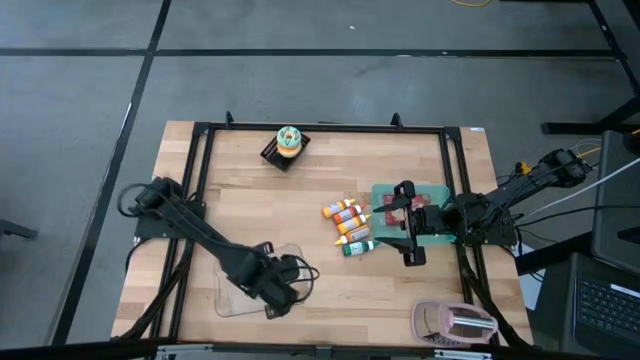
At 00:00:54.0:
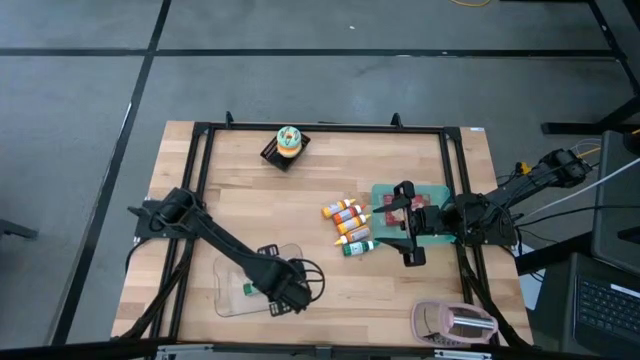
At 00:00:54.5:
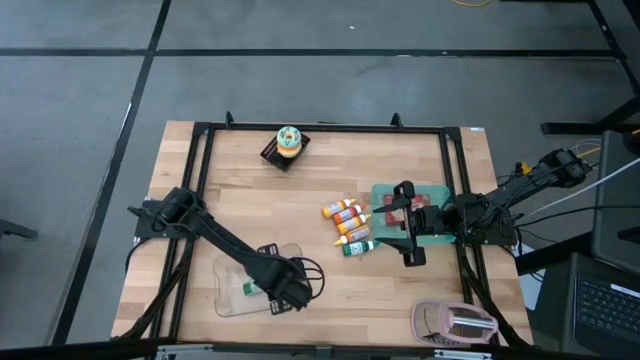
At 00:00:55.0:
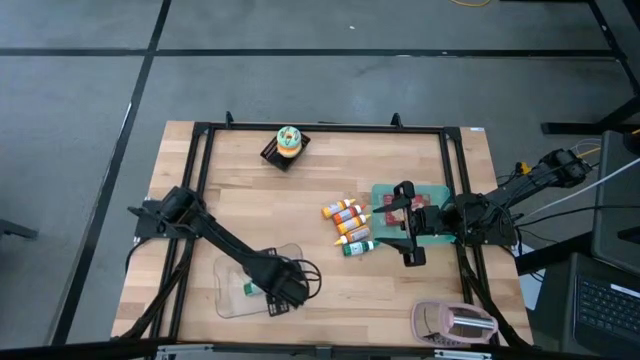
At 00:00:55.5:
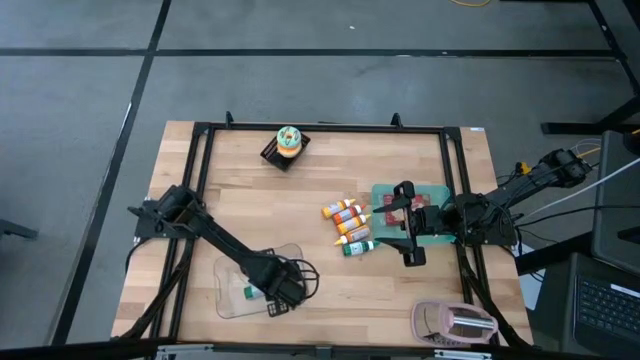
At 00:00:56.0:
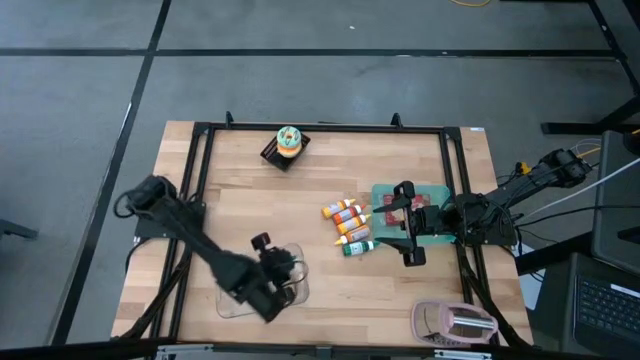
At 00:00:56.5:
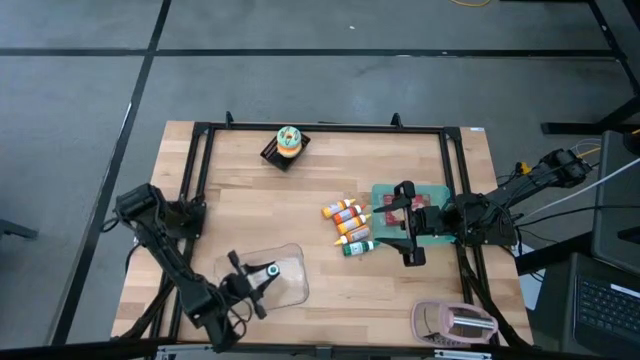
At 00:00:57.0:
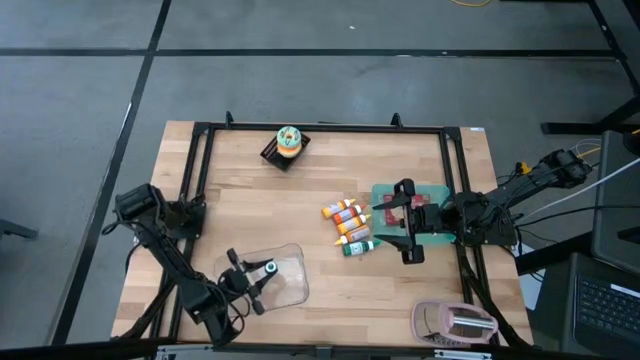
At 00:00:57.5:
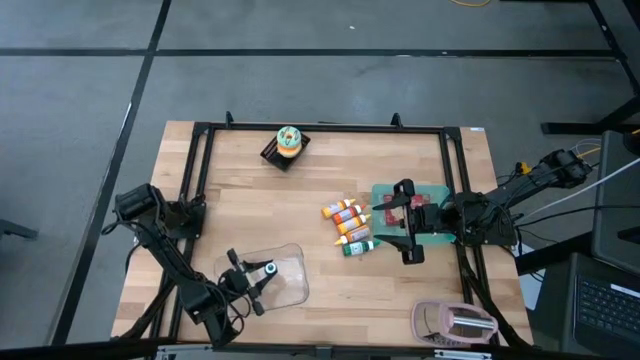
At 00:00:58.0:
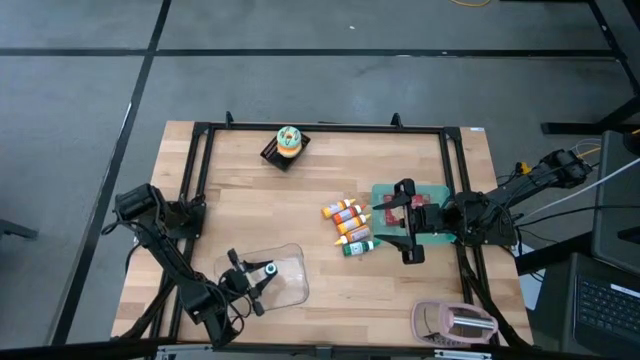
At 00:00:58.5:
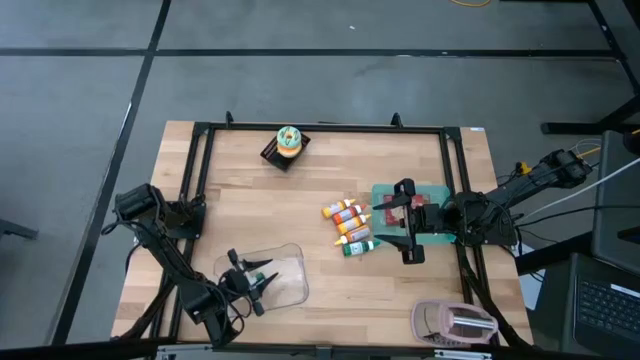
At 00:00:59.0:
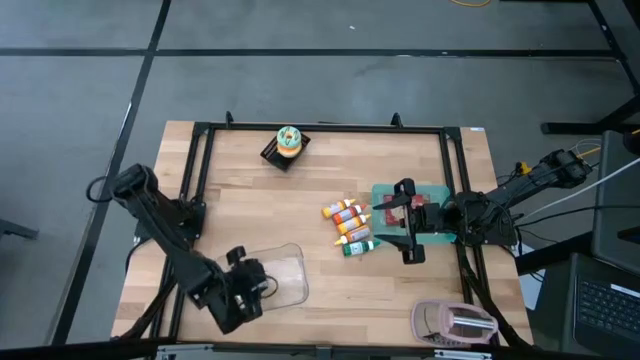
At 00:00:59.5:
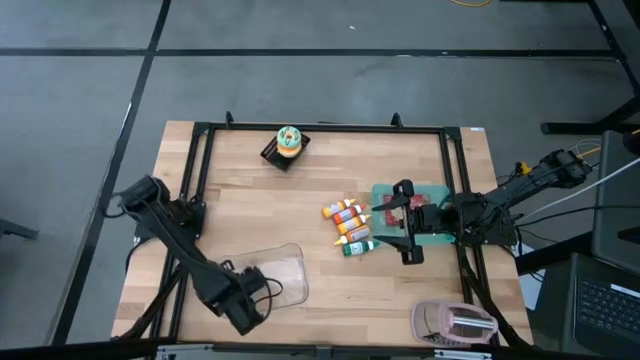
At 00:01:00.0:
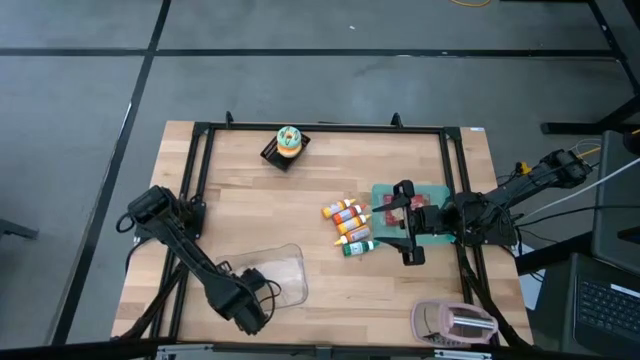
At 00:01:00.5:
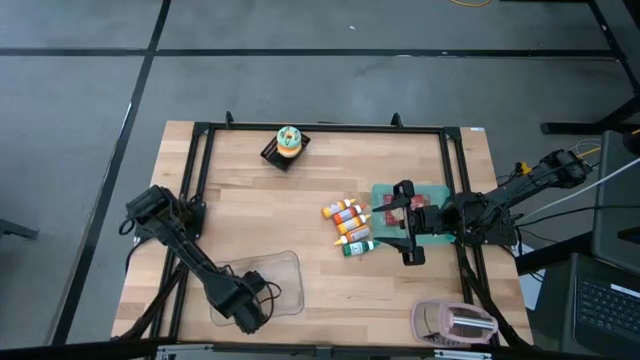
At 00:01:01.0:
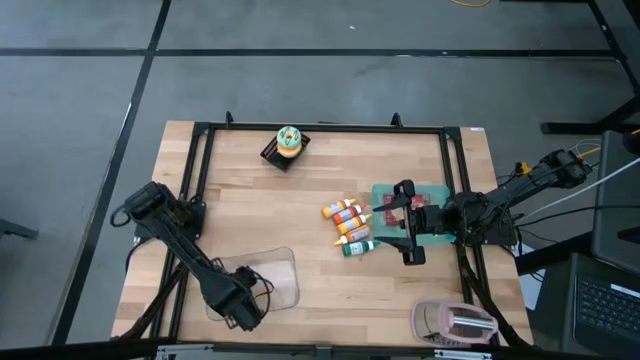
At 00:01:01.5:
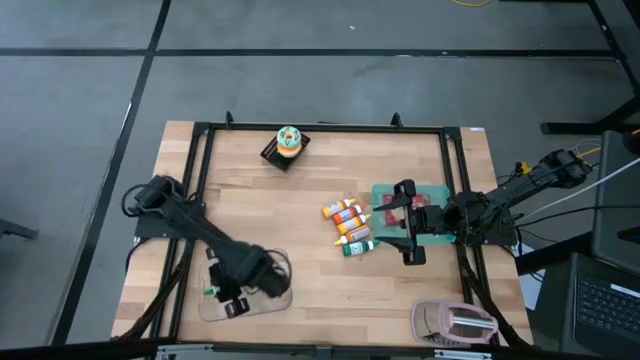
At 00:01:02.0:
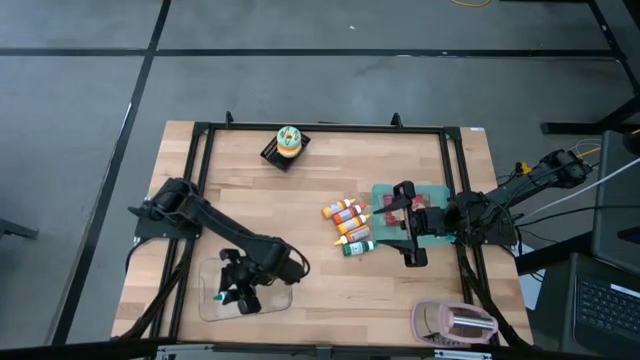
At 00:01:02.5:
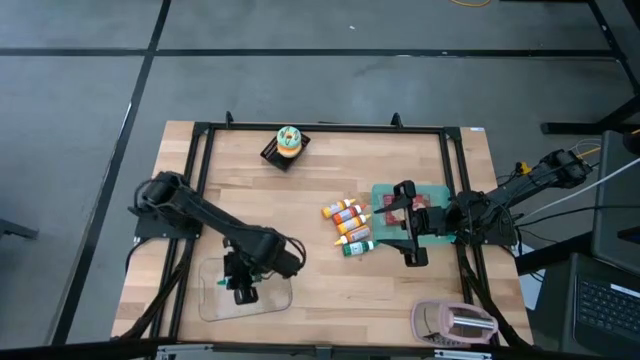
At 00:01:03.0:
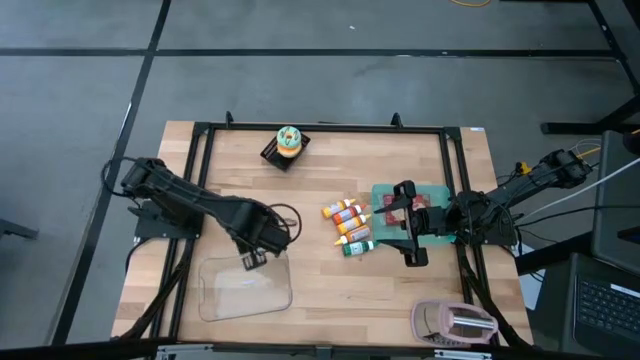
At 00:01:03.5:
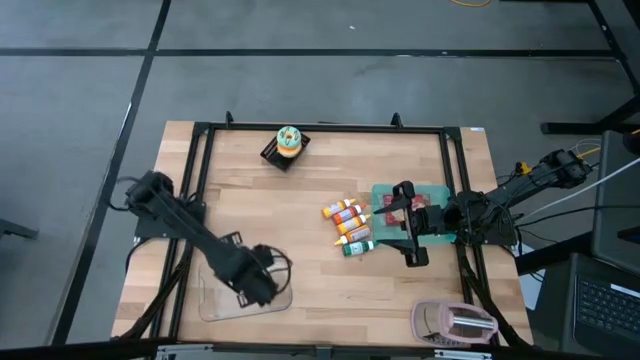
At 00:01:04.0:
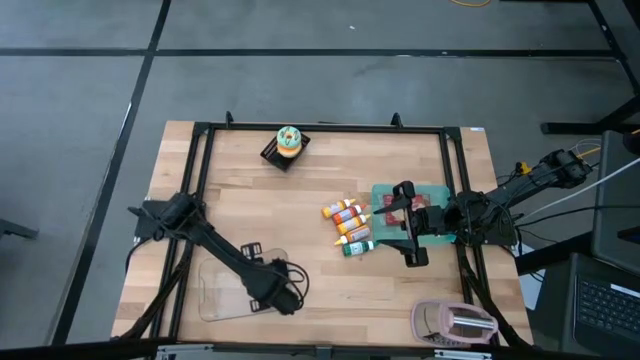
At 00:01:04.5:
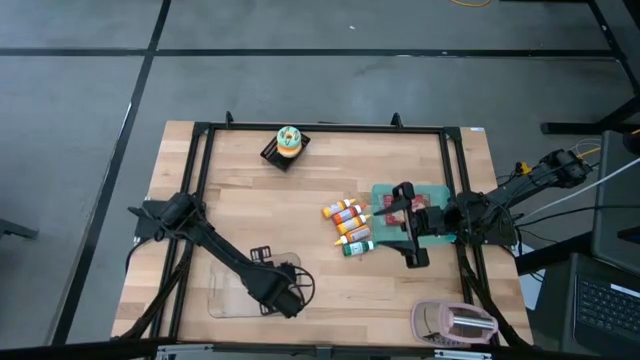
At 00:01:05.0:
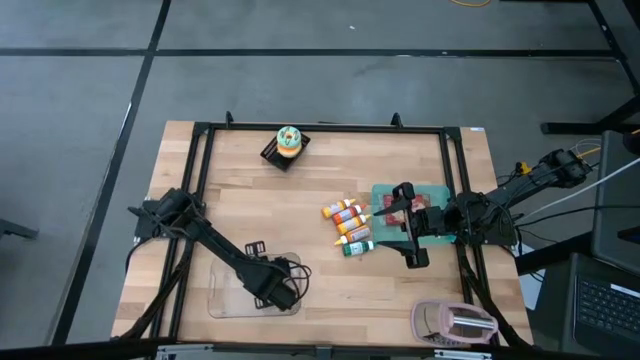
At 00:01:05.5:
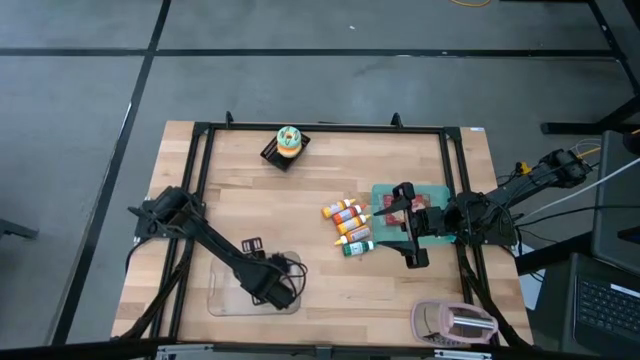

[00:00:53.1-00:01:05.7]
Adjust the green food coloring bottle in the transparent bin

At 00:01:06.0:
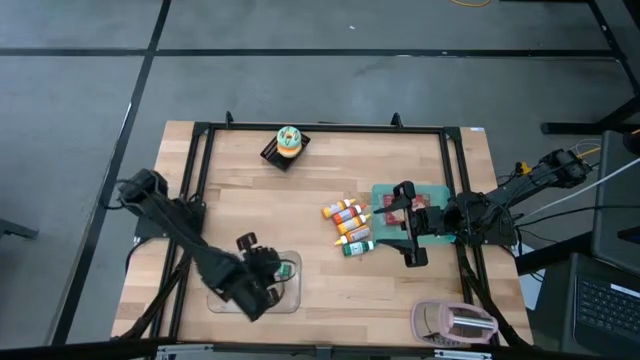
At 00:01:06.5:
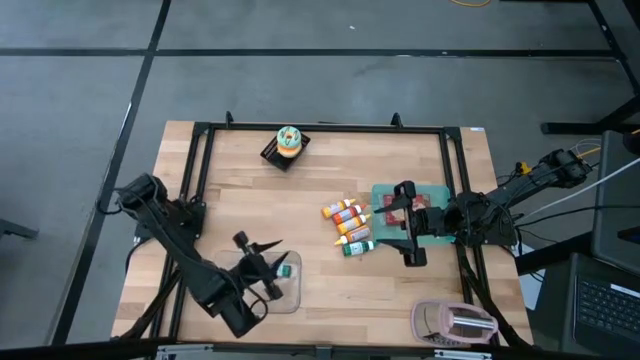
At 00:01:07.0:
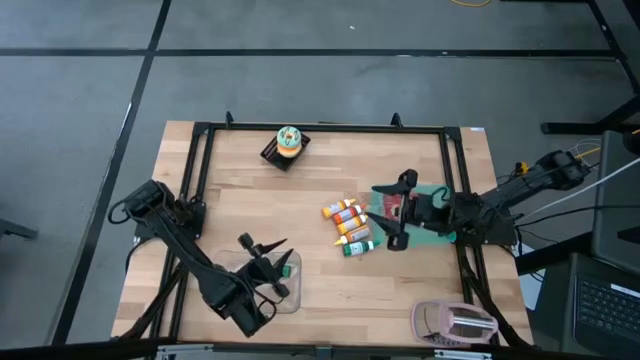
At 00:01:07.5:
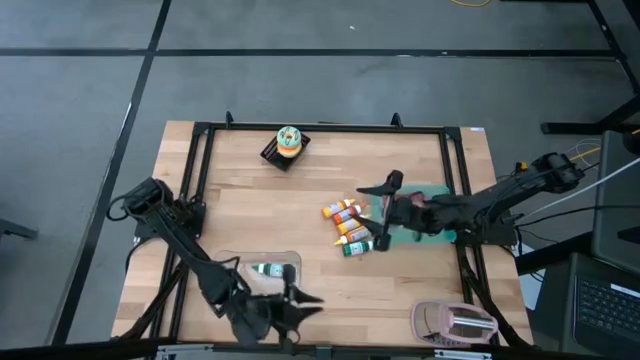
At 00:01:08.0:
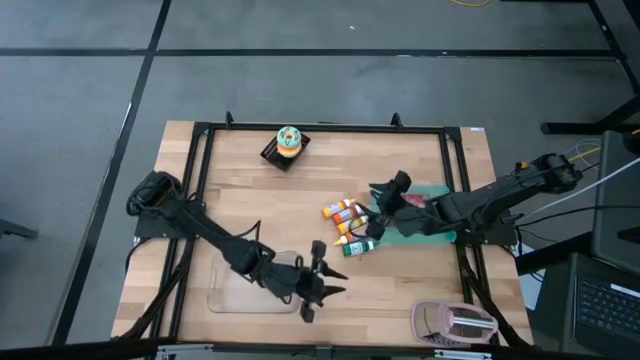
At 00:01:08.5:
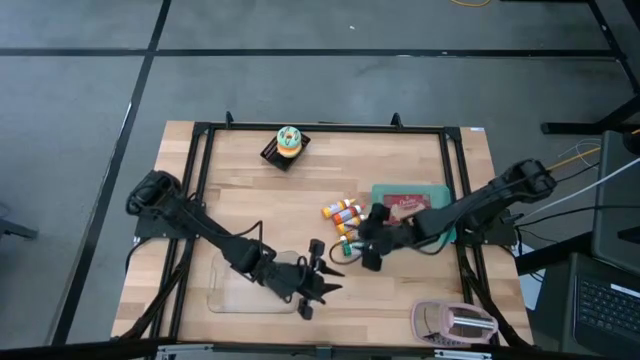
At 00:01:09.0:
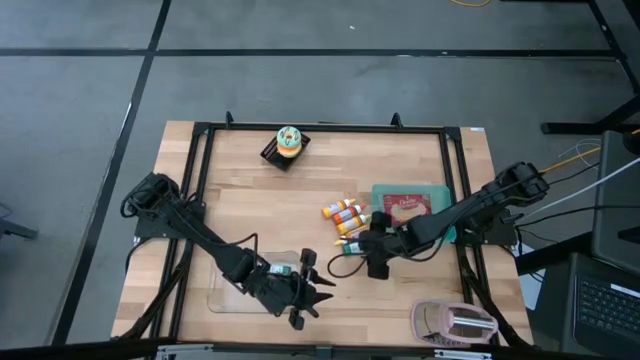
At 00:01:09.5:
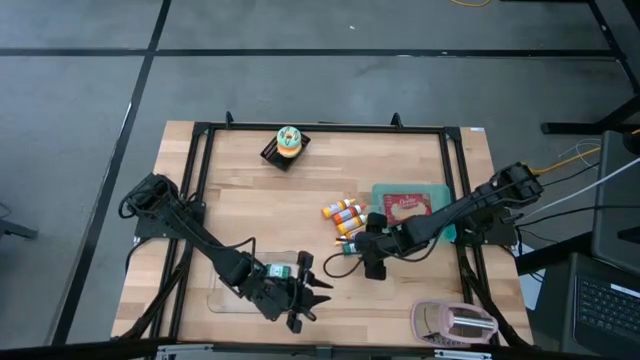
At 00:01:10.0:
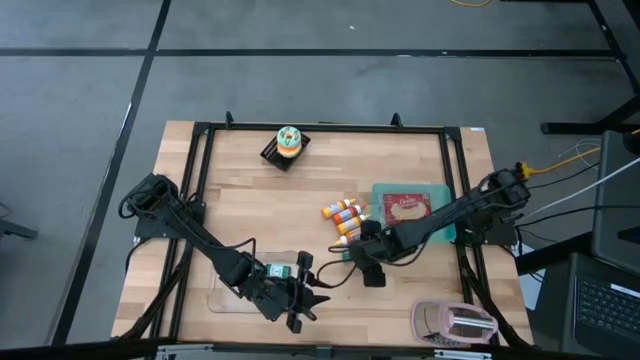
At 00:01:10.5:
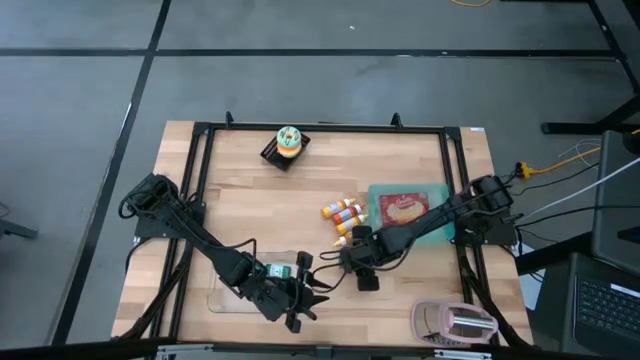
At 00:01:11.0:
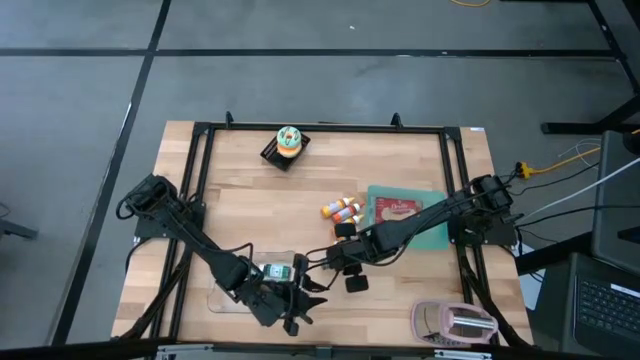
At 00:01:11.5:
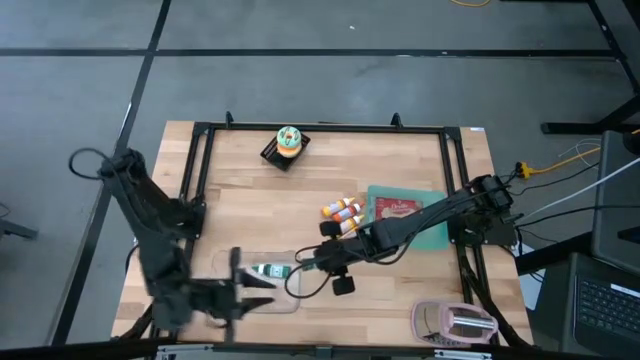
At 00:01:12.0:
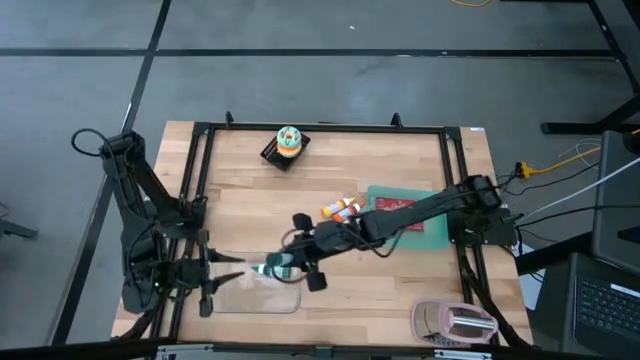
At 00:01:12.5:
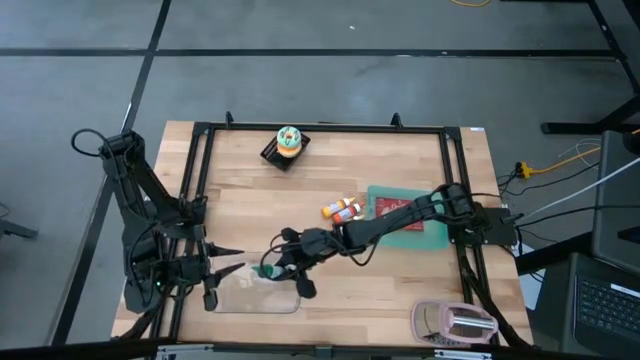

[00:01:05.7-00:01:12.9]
Put the green food coloring bottle into the transparent bin
